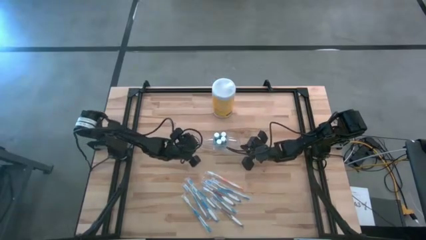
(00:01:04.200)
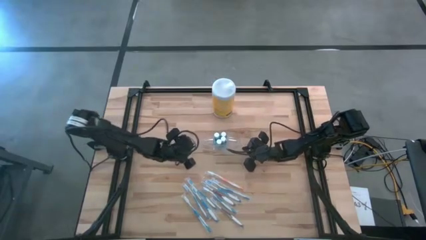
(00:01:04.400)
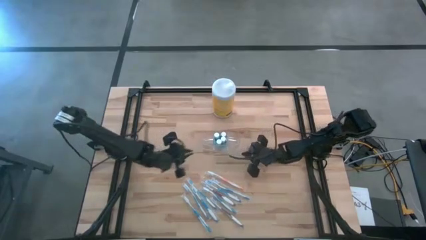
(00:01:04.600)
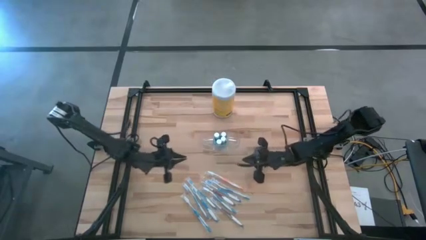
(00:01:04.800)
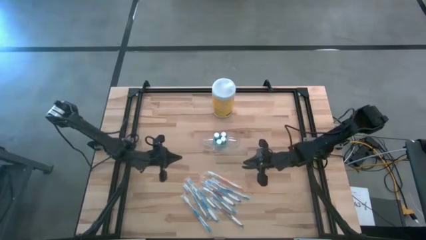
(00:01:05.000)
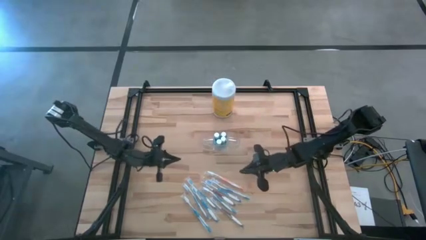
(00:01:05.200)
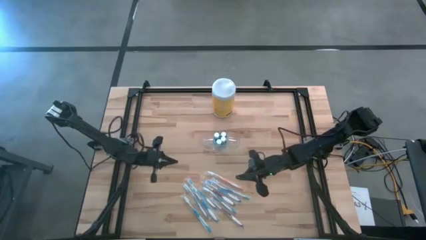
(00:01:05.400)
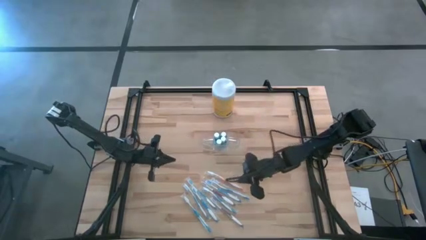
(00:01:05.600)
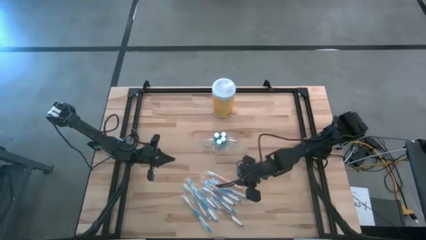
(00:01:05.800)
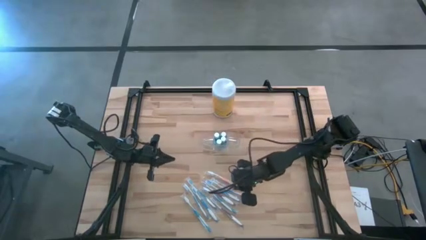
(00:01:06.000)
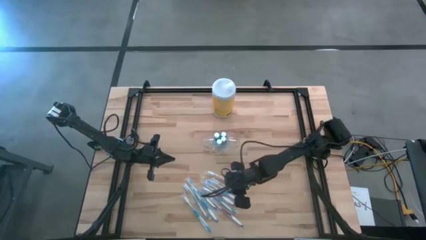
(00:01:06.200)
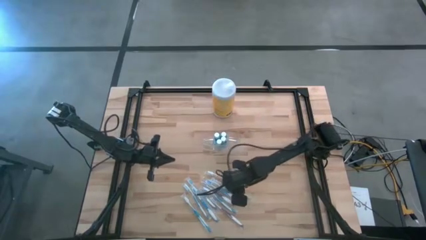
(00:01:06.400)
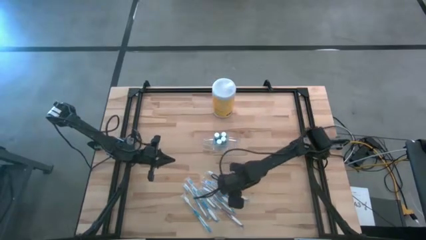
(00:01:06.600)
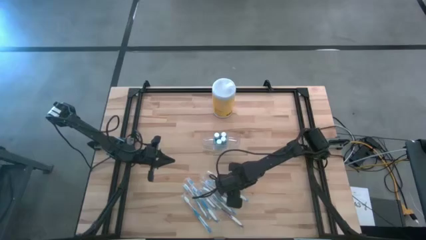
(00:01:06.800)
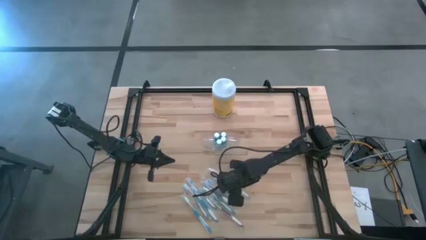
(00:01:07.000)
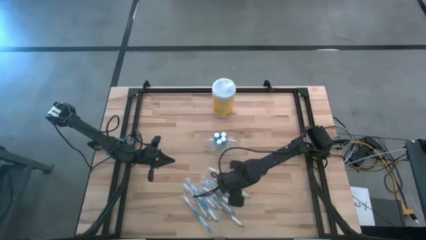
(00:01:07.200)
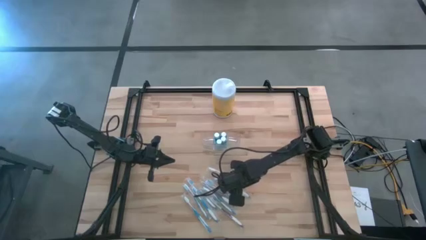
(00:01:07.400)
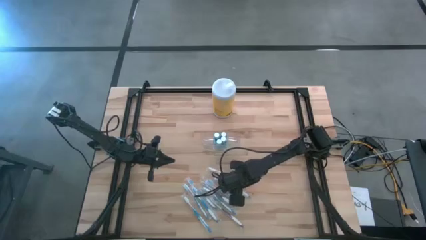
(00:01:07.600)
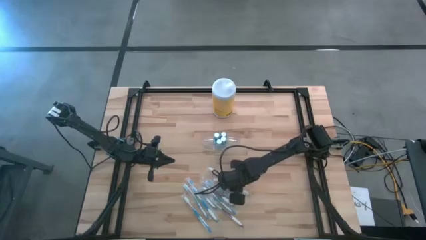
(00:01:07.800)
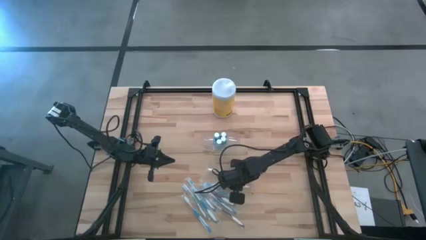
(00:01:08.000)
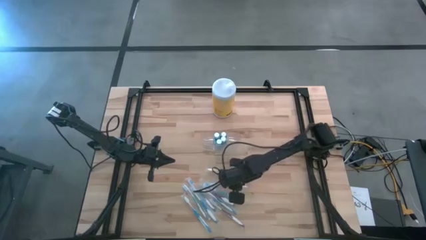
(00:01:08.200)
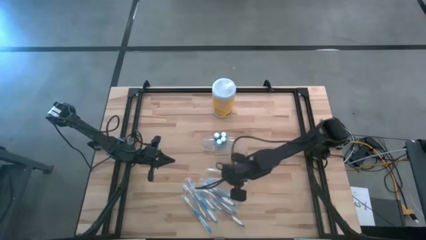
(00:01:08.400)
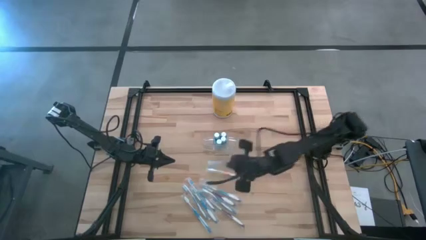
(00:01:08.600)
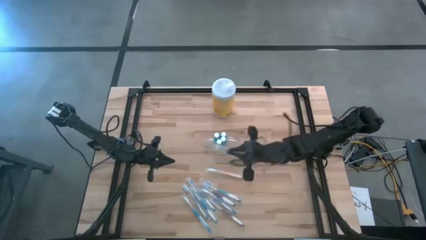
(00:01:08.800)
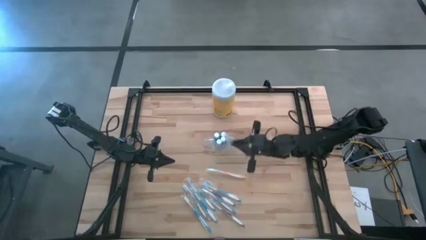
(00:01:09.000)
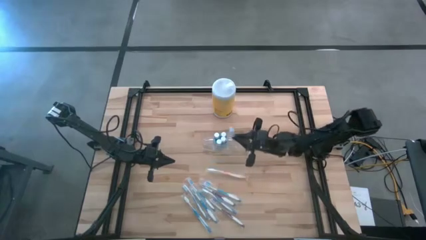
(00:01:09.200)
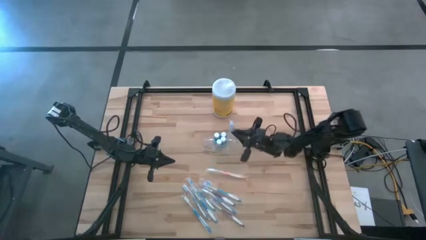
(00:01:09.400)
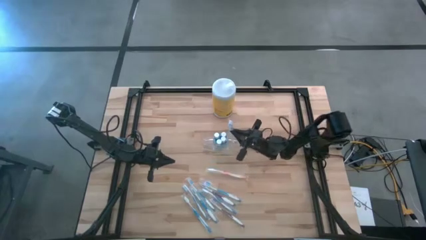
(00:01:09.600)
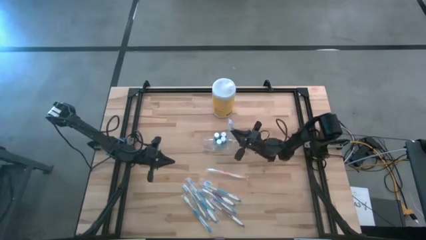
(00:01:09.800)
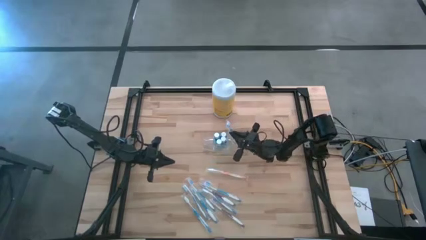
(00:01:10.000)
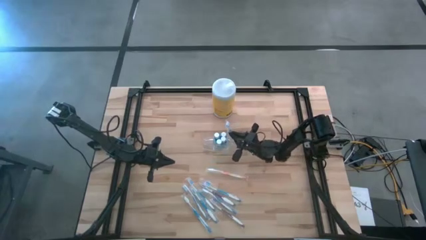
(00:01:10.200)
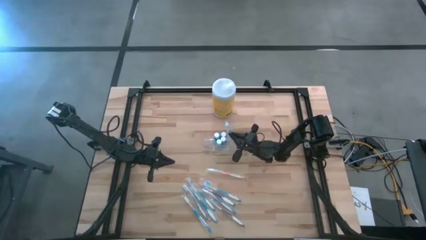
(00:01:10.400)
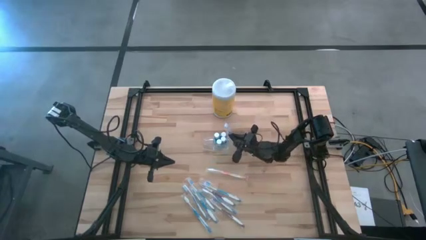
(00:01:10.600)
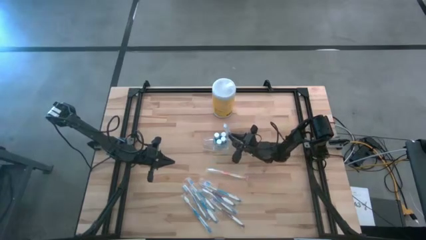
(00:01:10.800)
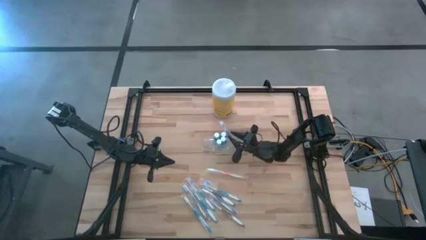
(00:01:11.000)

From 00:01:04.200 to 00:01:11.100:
Task: Pick & Place toothbrushing station
Put the blue toothbrush into the transparent organizer

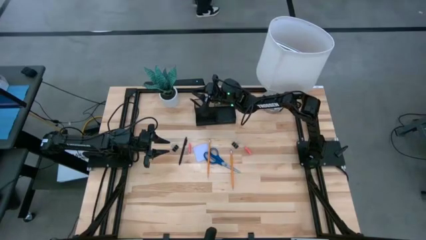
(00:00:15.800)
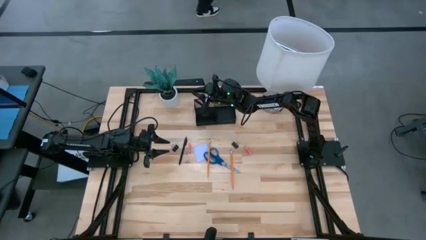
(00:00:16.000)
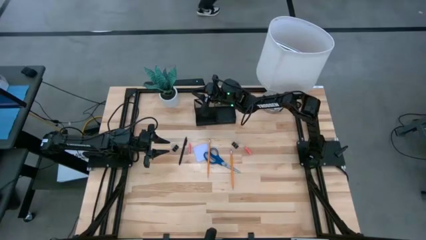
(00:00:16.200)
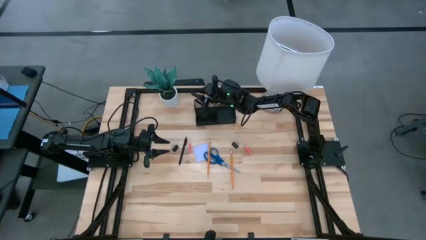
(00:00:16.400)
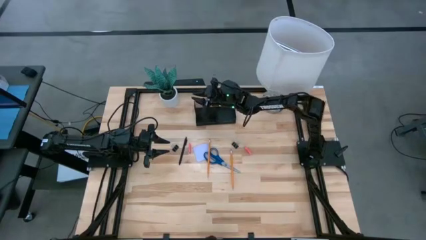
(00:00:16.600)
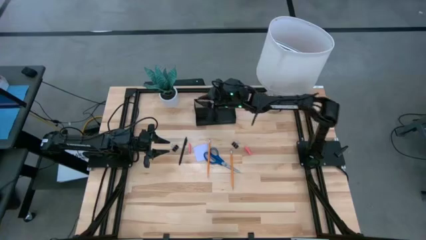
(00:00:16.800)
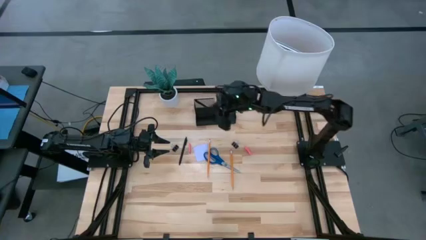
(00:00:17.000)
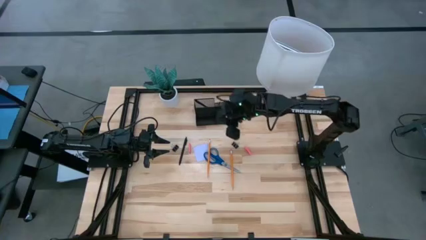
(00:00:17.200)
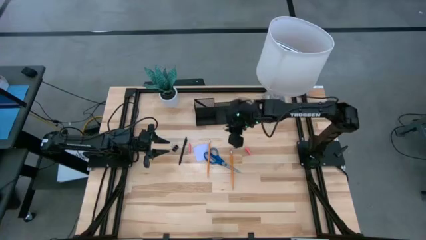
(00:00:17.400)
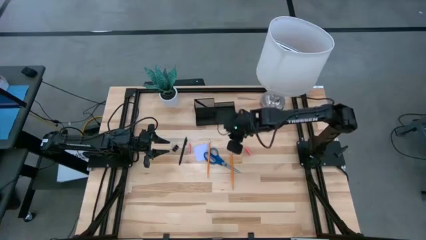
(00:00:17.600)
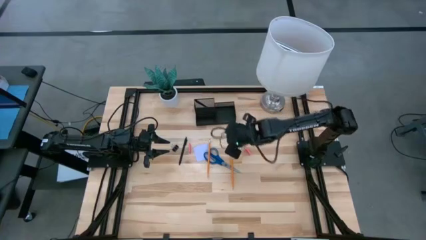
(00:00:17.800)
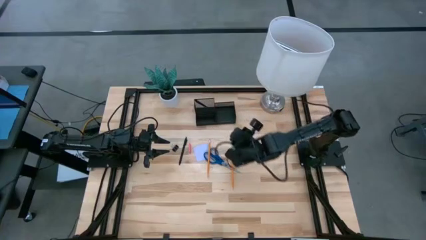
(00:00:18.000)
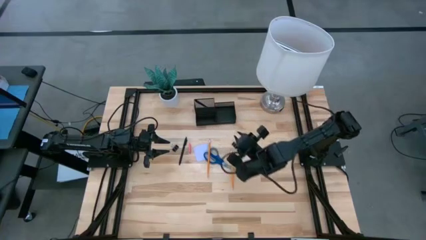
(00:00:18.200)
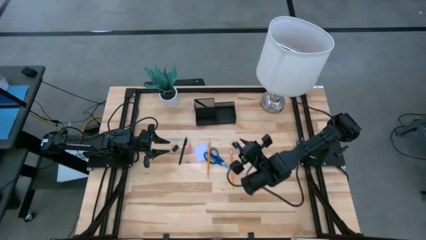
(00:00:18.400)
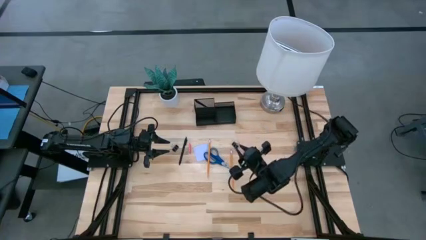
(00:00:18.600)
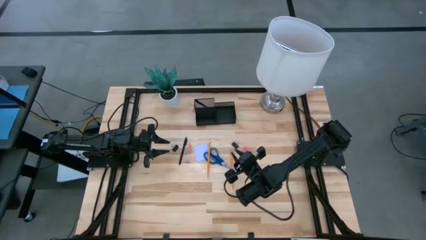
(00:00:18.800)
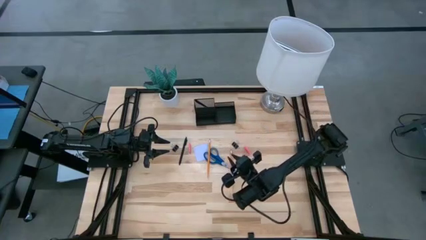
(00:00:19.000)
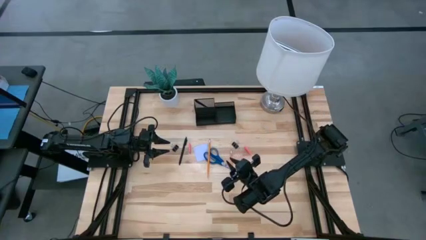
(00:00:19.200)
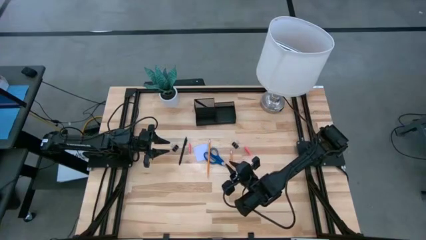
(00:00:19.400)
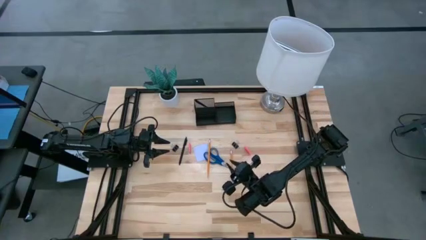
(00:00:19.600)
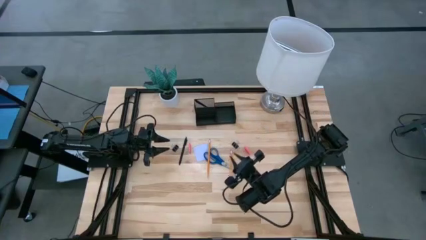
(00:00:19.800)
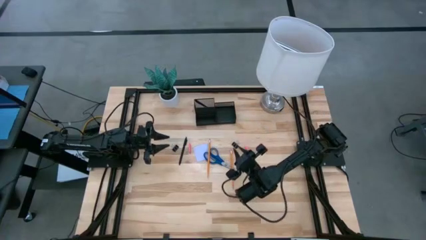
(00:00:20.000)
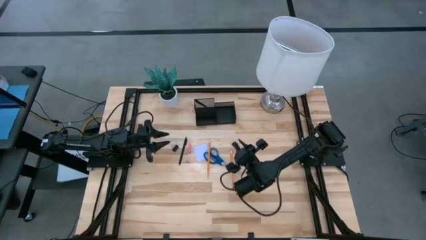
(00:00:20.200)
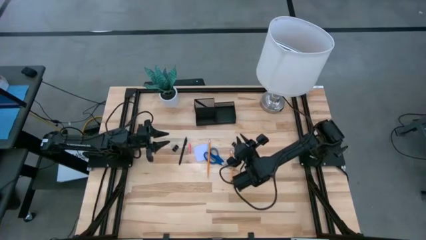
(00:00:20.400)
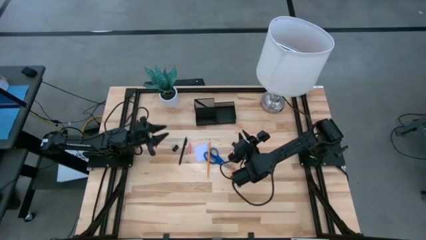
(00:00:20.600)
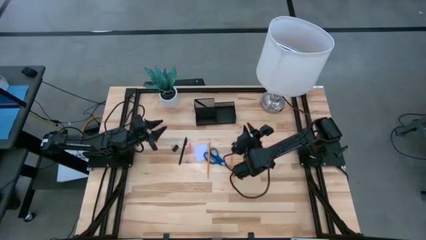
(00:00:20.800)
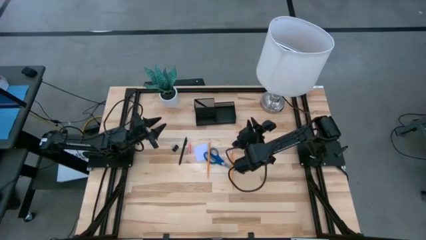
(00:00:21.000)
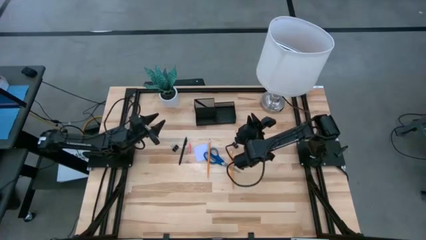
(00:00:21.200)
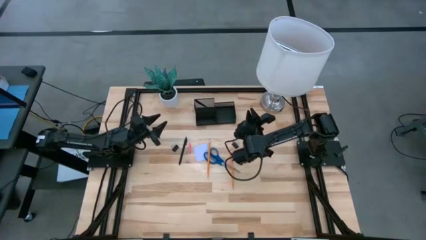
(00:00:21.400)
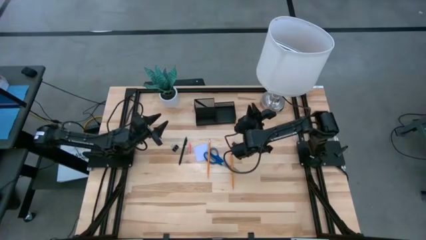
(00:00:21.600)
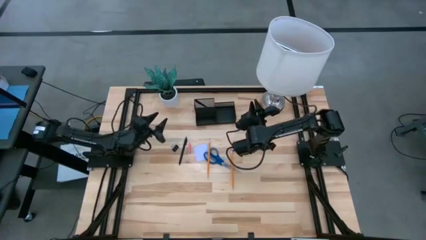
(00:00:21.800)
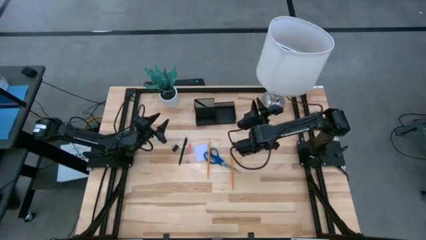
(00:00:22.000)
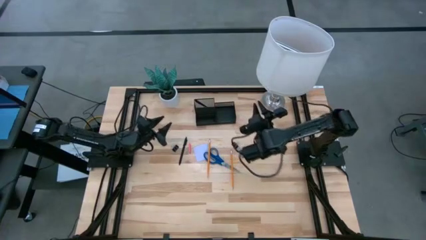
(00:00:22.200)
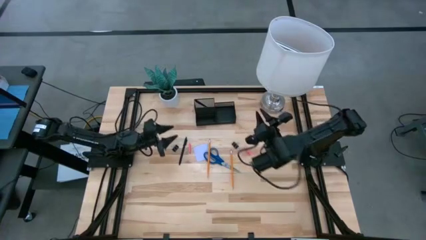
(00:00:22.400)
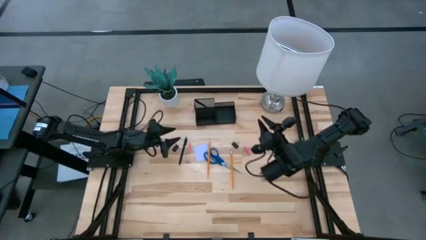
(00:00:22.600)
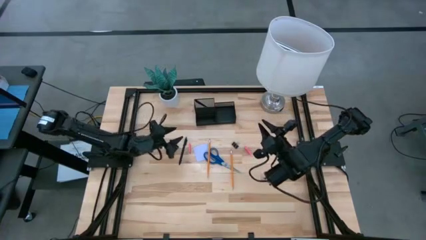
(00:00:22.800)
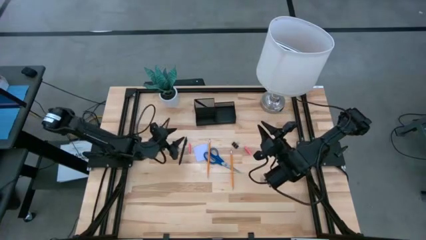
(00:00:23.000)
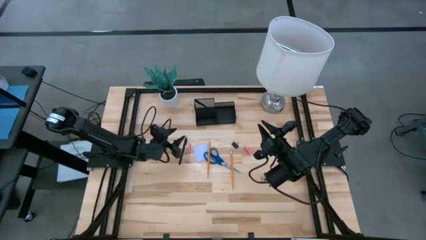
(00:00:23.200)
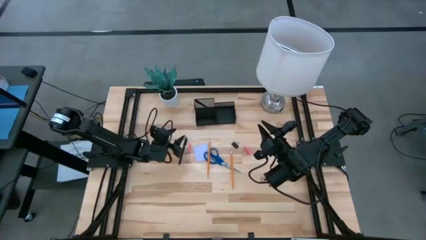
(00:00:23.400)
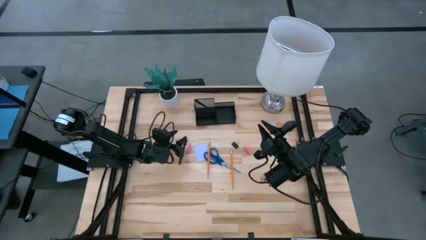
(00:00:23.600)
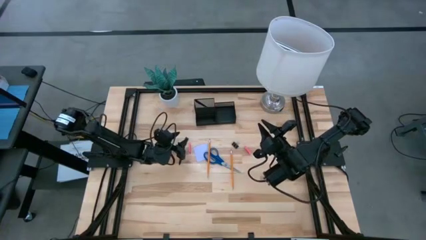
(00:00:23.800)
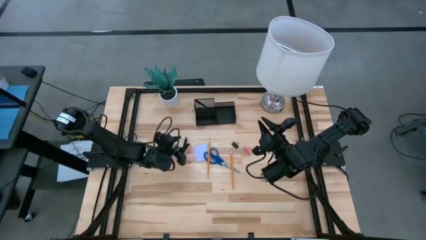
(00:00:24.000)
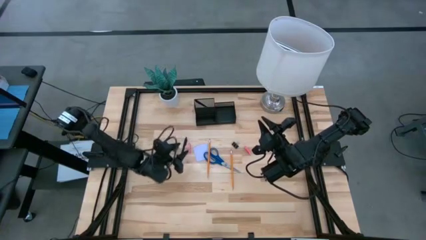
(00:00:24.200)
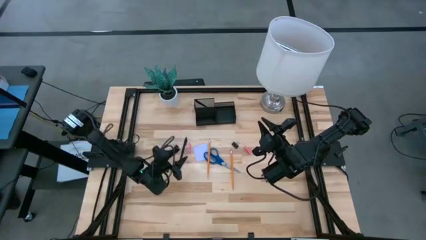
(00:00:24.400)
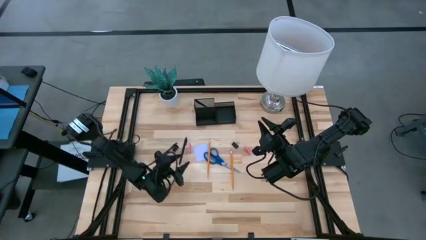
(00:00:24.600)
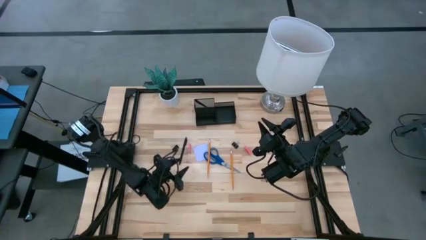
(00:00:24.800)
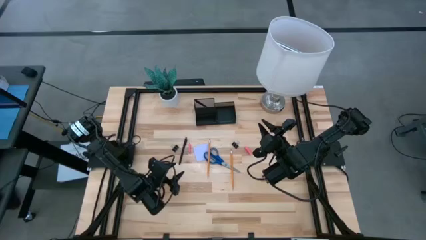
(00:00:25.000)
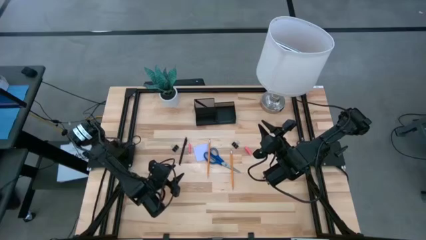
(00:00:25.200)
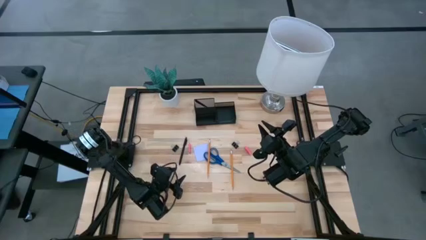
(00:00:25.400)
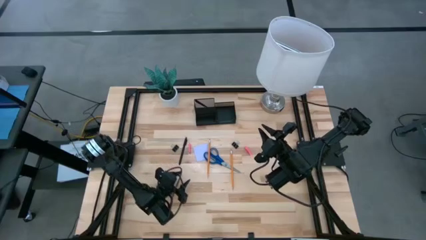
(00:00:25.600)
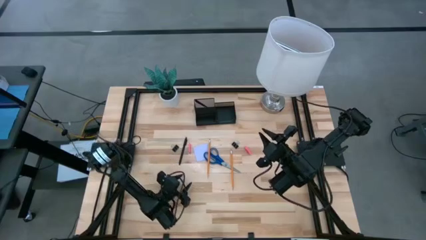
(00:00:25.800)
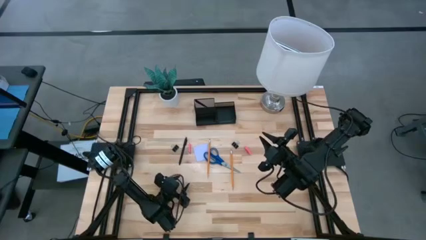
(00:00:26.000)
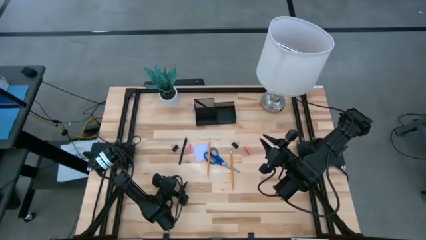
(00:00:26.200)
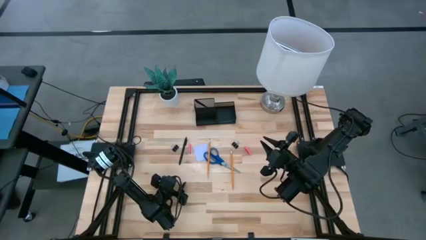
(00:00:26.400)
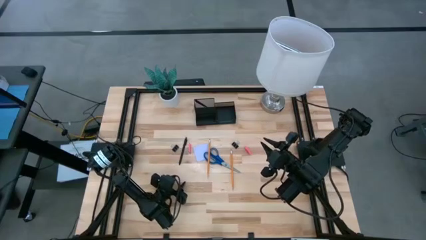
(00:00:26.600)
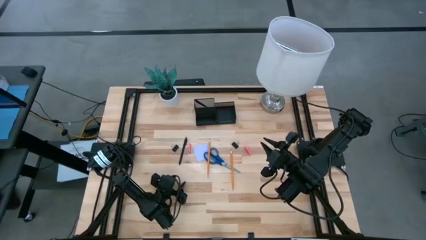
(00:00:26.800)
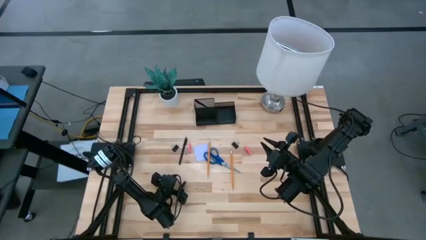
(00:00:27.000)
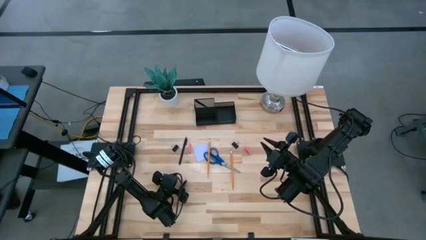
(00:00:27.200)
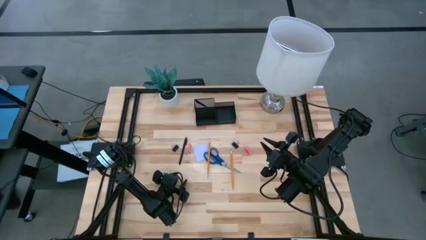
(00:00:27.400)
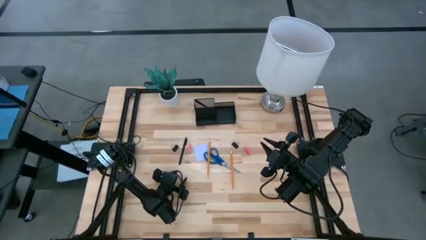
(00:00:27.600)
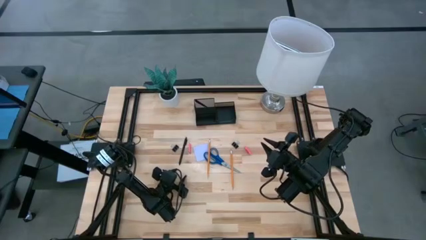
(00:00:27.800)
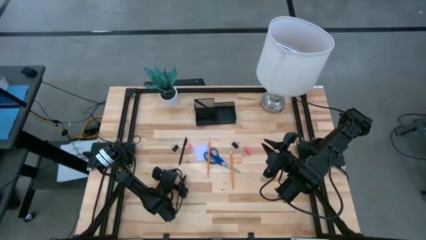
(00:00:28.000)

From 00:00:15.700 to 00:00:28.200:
Task: Pick and place office supplies into organizer
Put the pen into the desk organizer
